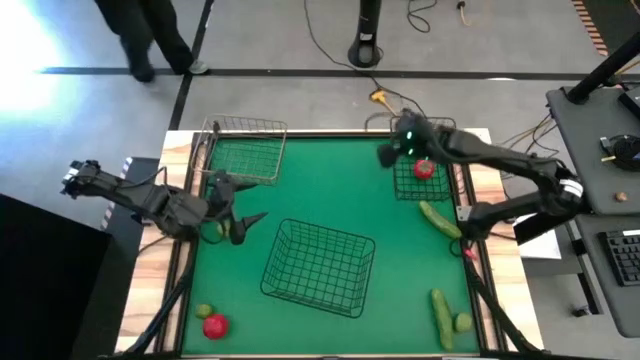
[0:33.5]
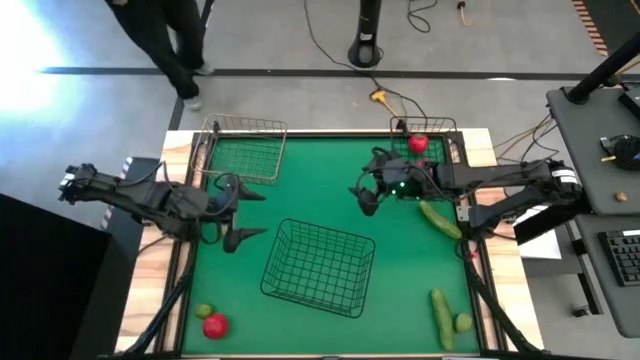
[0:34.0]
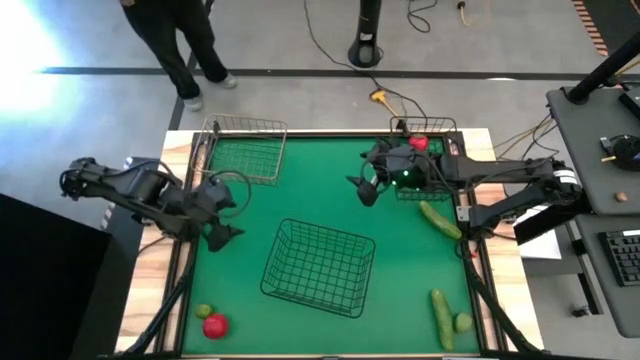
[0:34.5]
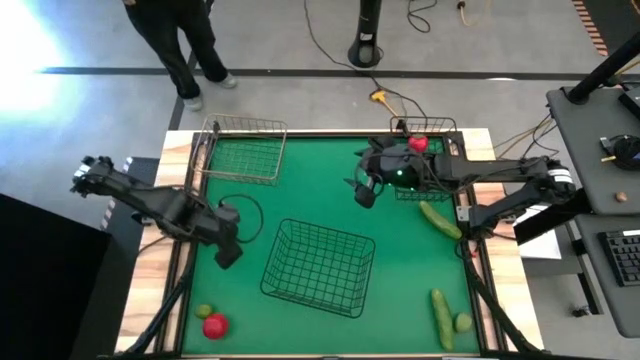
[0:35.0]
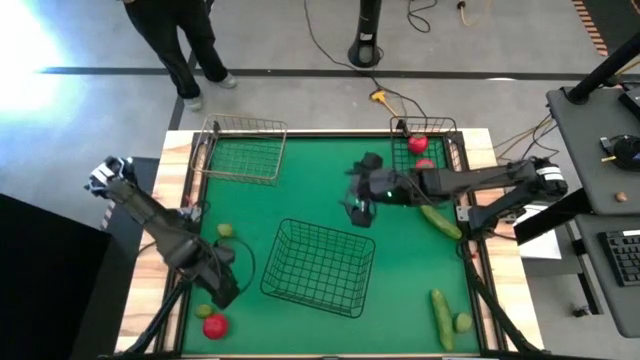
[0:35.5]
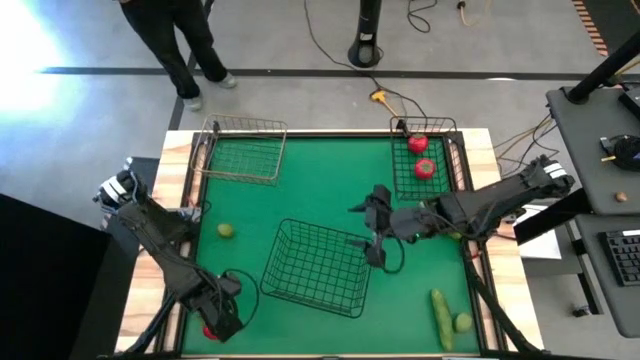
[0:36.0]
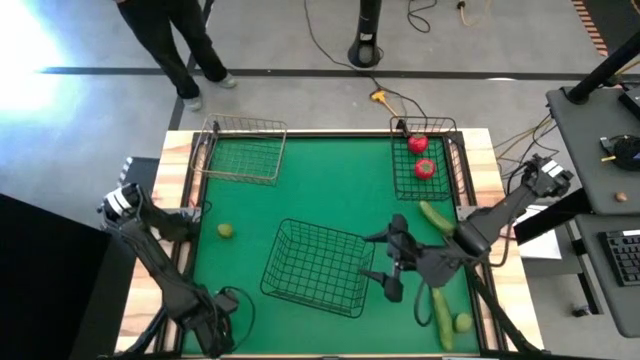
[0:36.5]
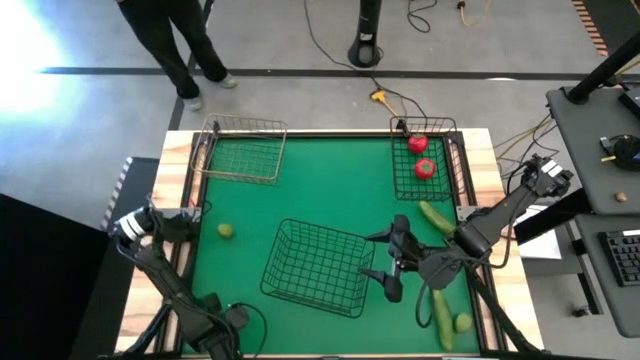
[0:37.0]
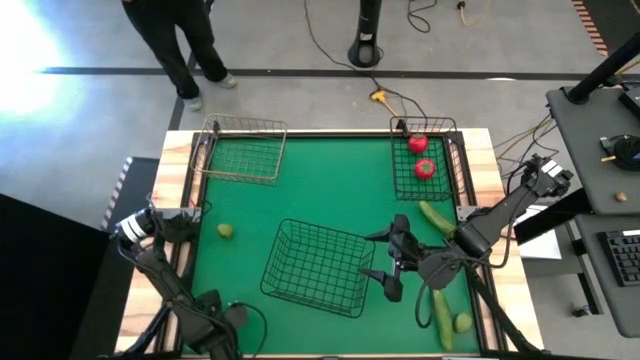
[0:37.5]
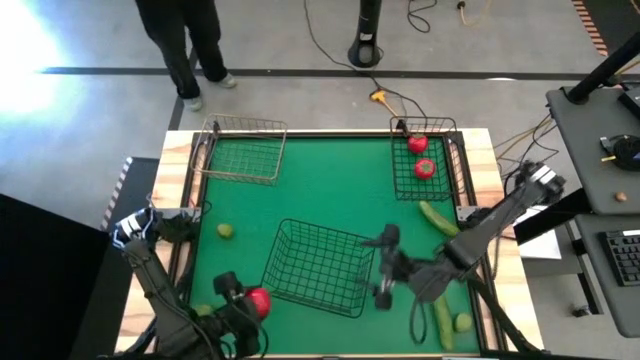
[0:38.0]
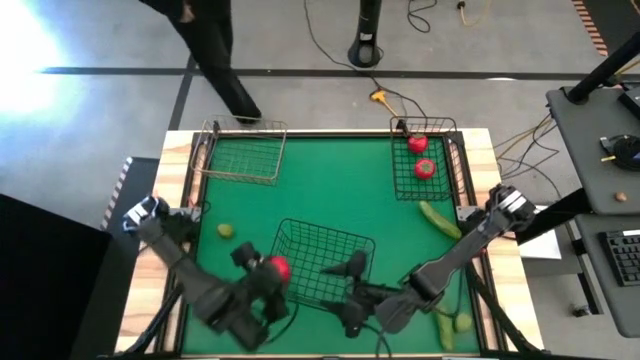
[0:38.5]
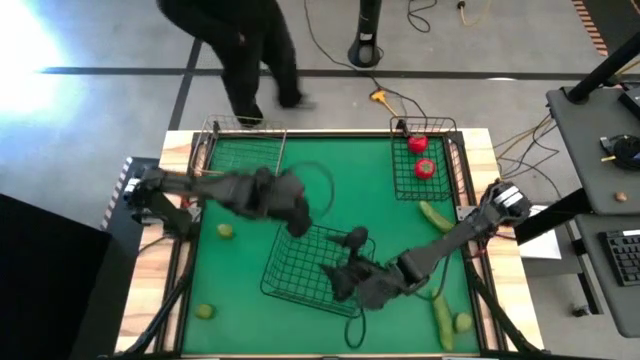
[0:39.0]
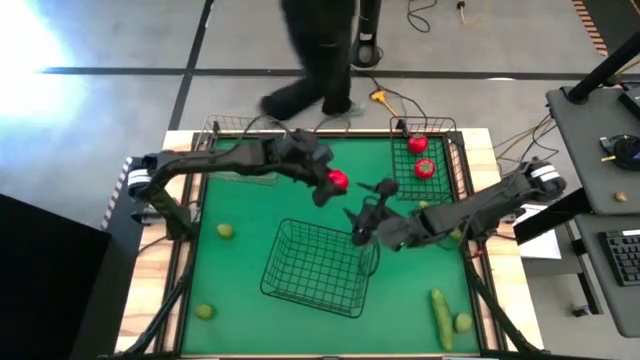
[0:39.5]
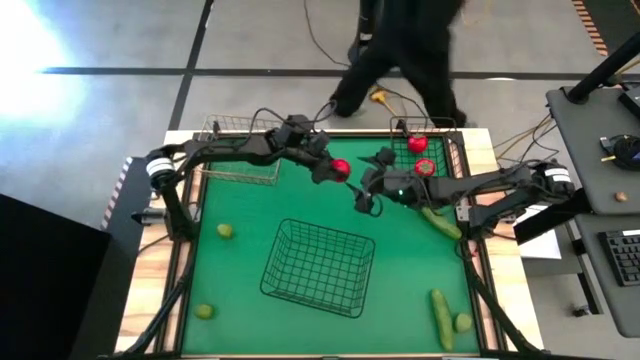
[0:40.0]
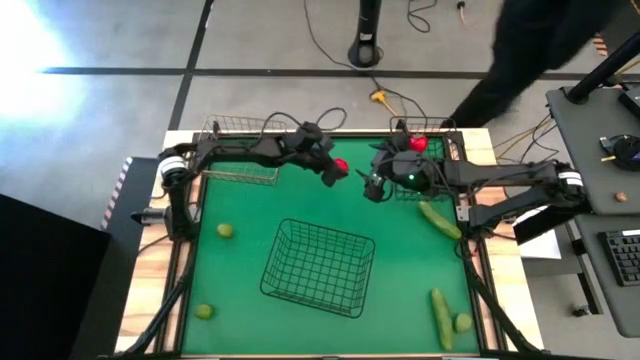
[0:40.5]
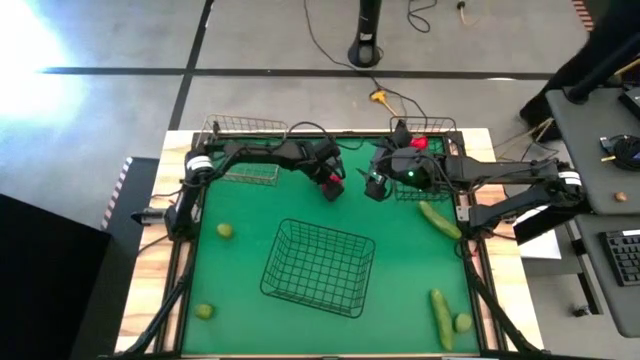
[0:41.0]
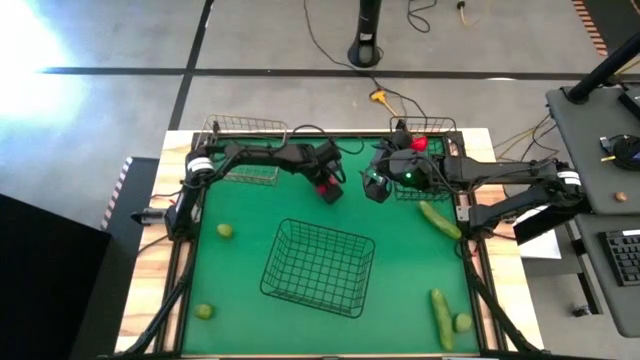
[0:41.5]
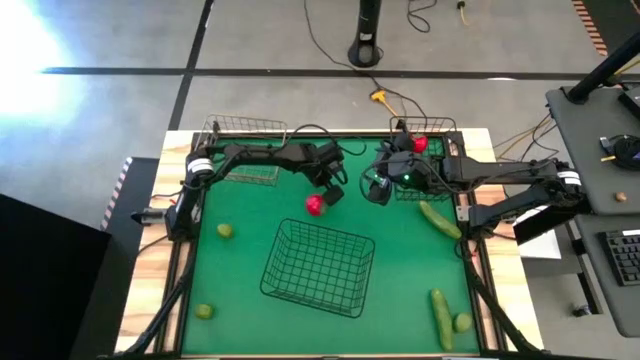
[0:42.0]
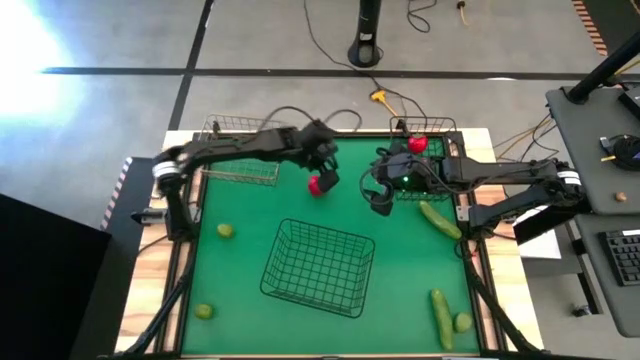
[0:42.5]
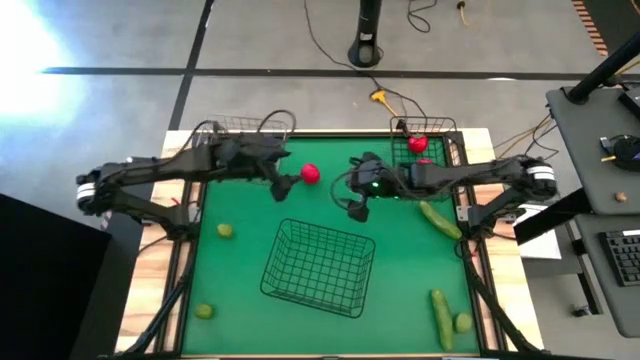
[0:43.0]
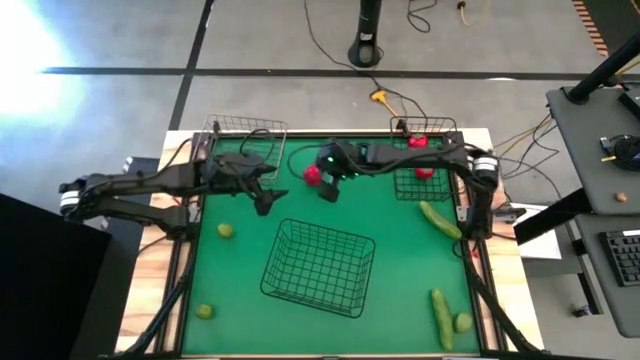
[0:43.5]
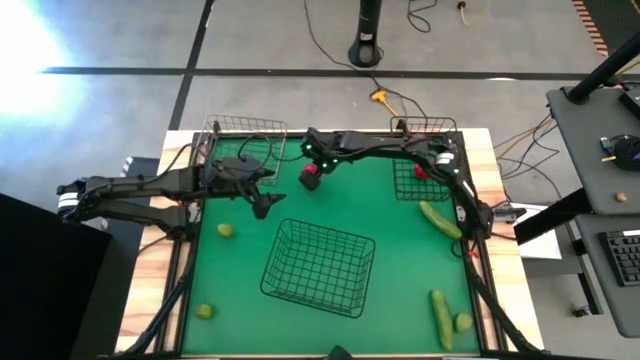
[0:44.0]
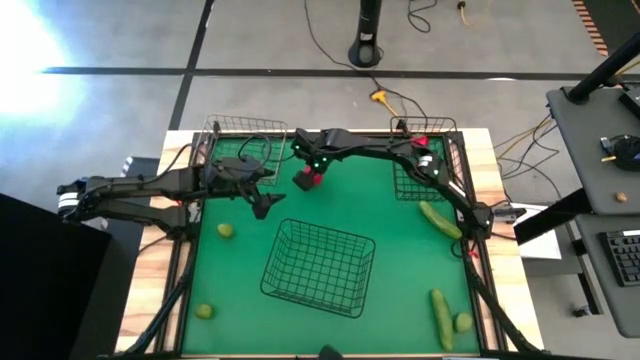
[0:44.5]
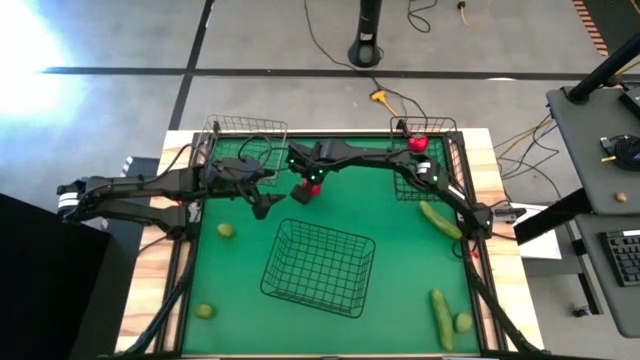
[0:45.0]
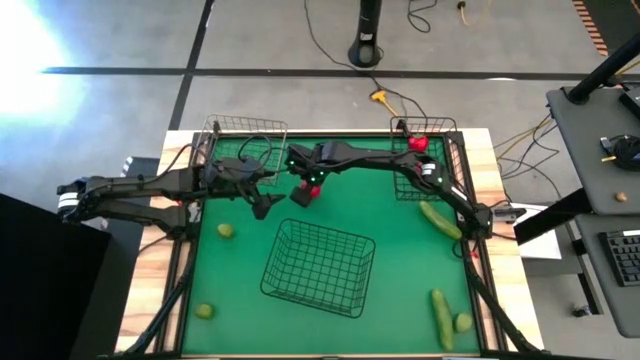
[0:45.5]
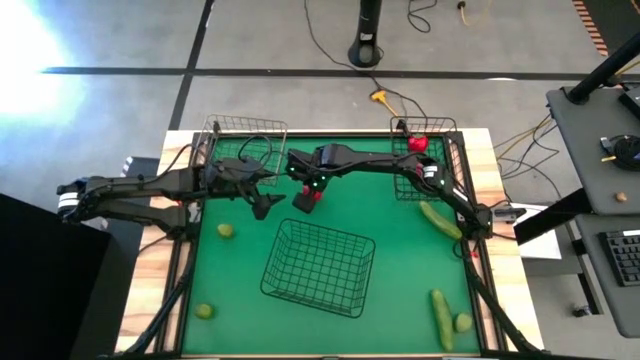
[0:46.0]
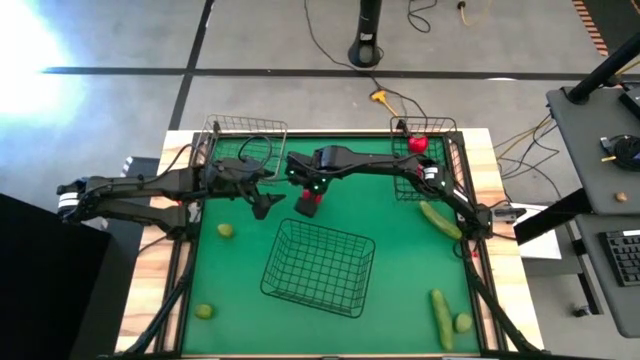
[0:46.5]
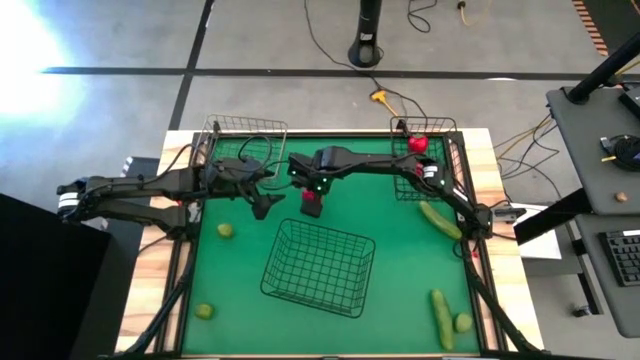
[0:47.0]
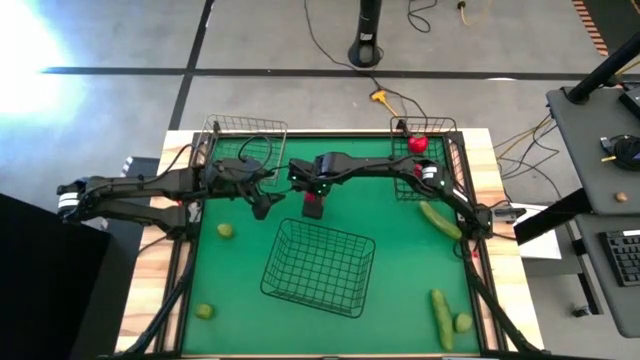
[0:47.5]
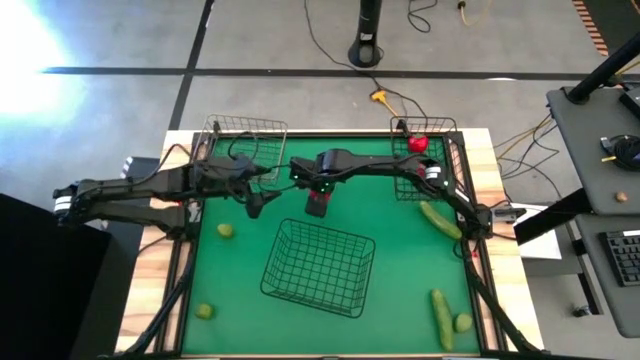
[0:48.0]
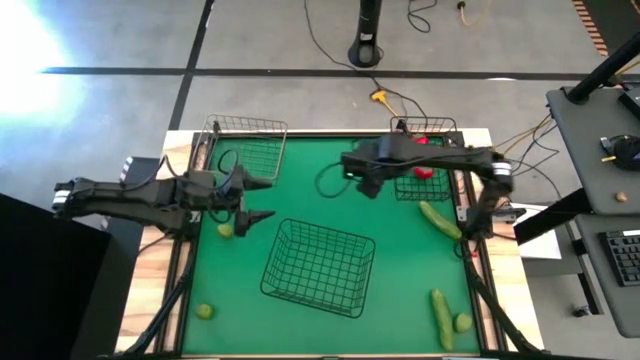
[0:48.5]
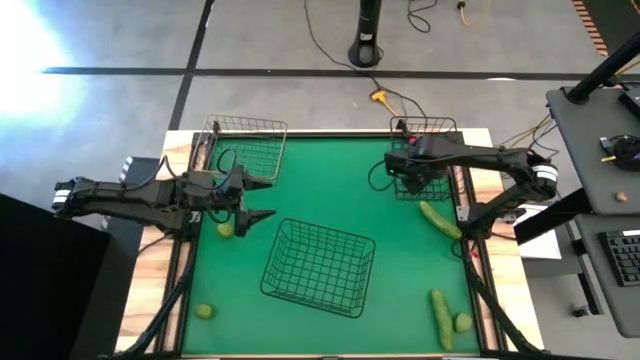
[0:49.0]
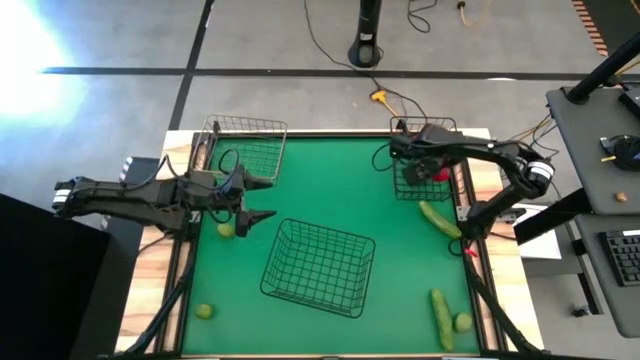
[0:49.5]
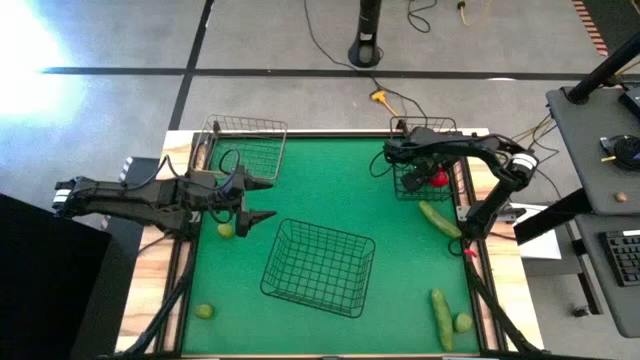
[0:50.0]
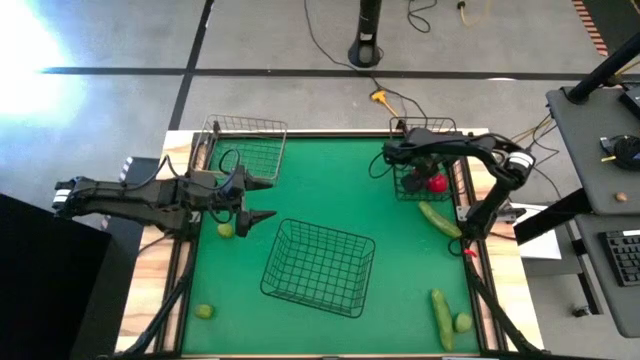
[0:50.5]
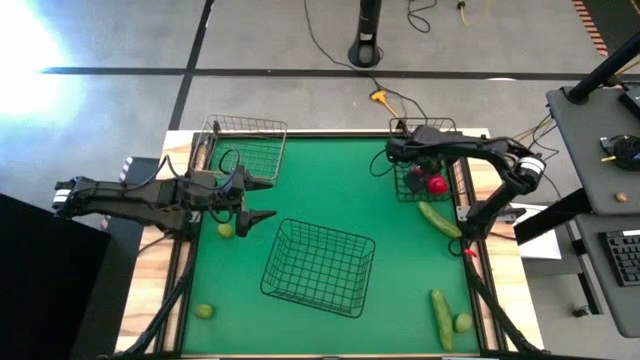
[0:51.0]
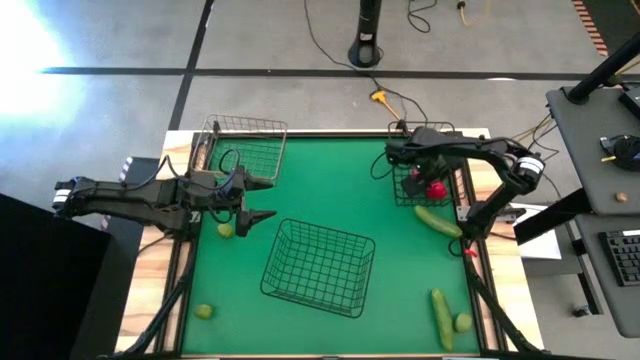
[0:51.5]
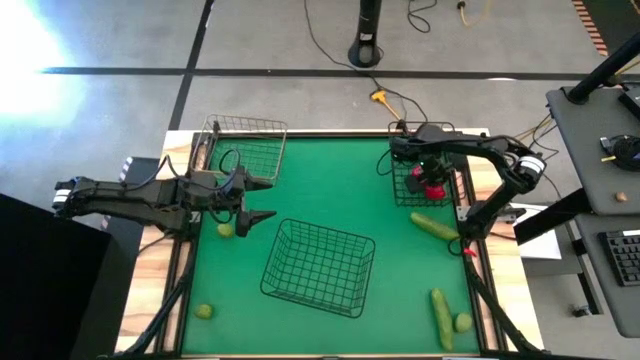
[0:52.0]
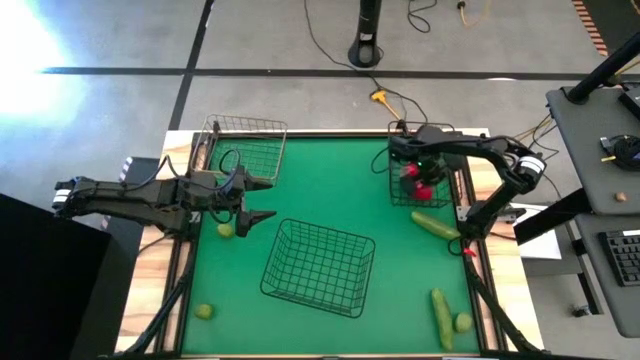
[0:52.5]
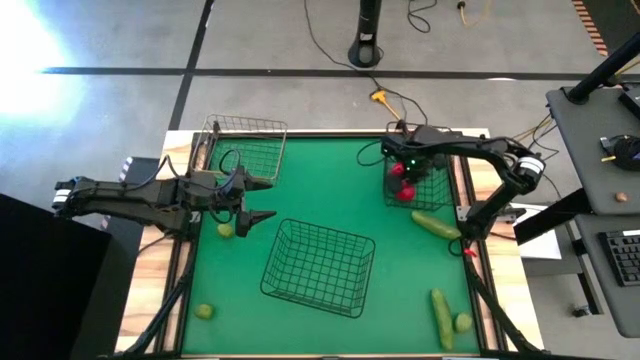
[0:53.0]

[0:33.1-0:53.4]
Task: Sort produce into baskets
Put the tomato into the top black wire basket
